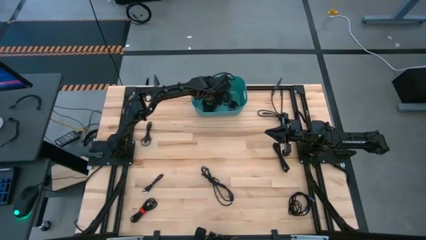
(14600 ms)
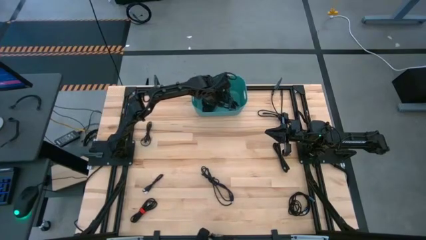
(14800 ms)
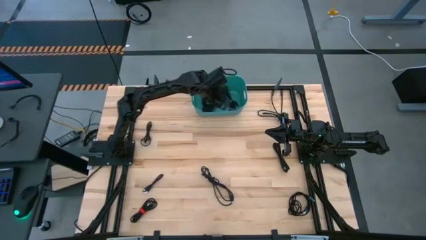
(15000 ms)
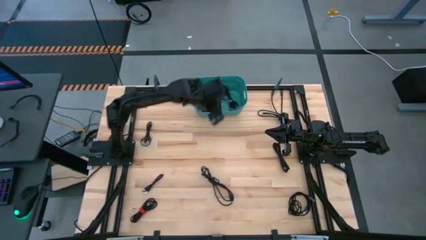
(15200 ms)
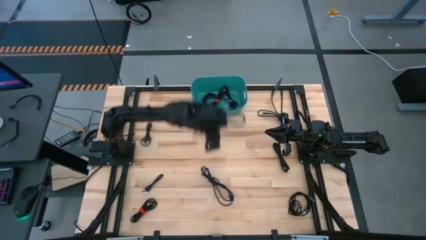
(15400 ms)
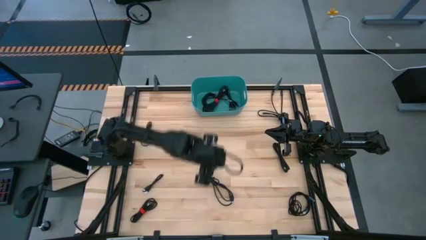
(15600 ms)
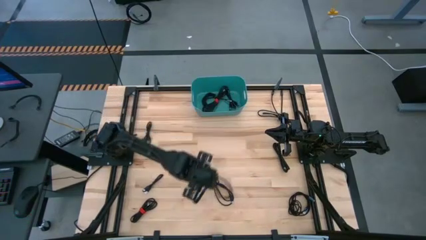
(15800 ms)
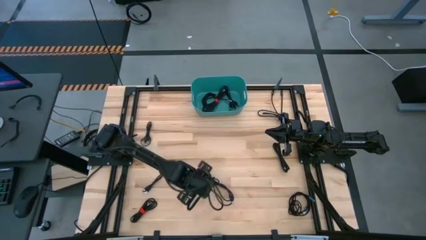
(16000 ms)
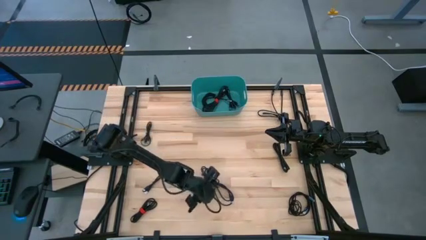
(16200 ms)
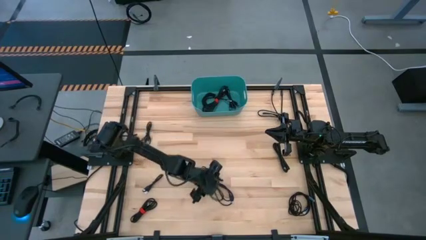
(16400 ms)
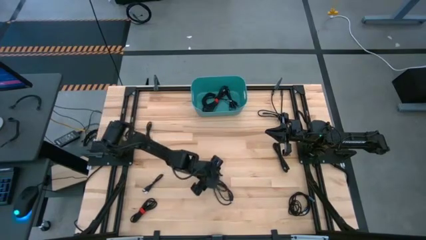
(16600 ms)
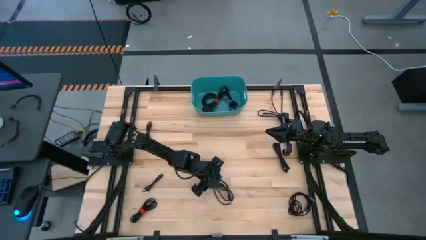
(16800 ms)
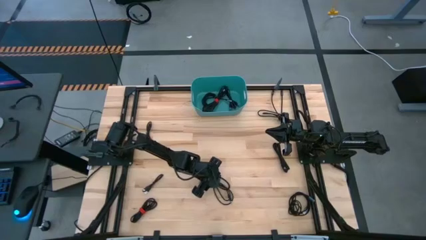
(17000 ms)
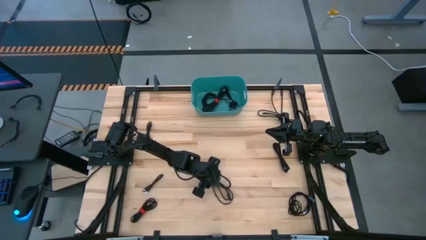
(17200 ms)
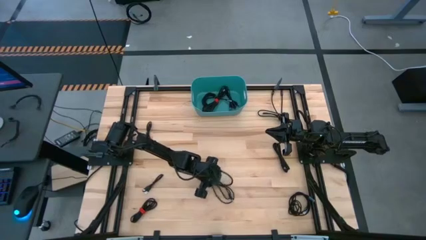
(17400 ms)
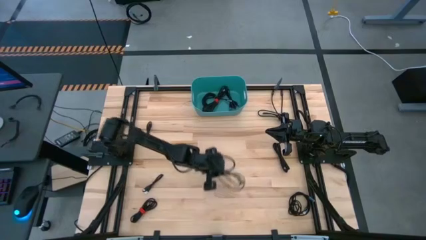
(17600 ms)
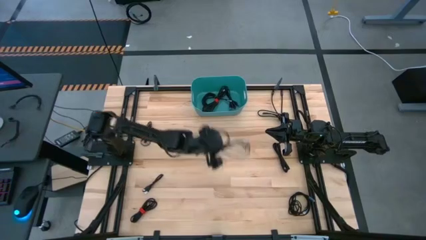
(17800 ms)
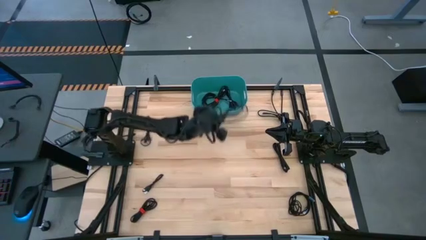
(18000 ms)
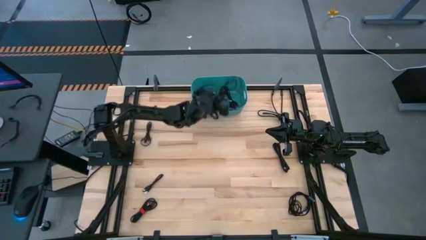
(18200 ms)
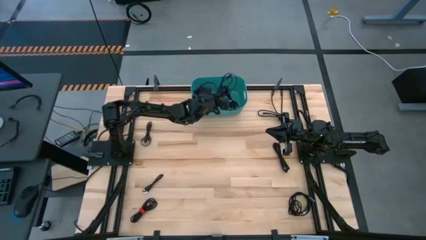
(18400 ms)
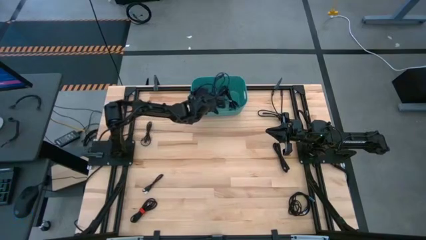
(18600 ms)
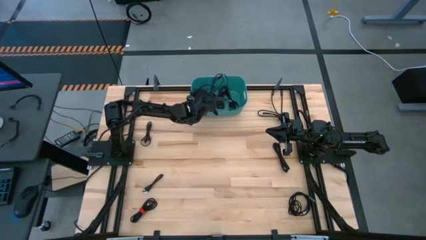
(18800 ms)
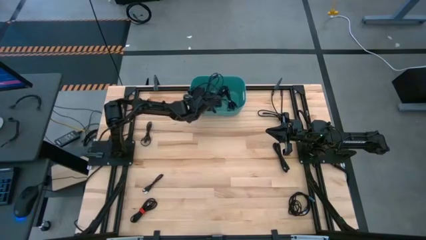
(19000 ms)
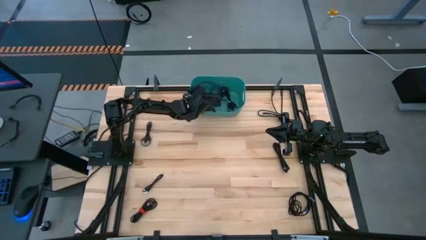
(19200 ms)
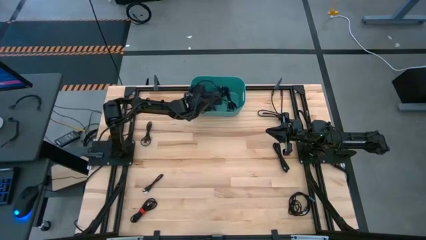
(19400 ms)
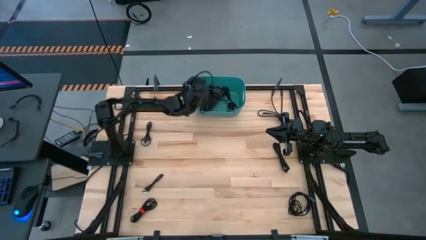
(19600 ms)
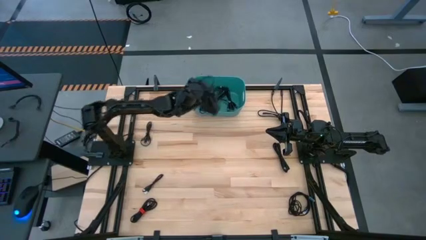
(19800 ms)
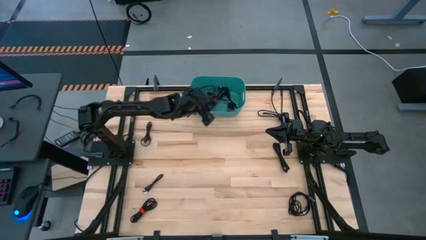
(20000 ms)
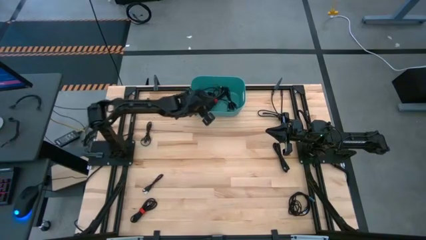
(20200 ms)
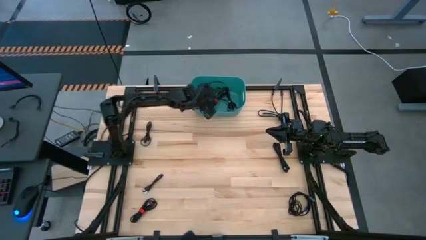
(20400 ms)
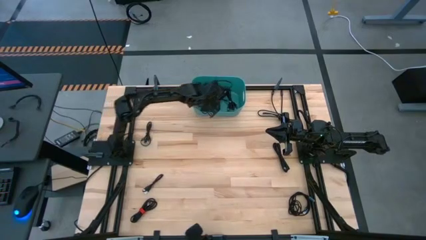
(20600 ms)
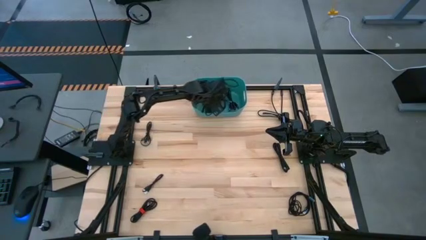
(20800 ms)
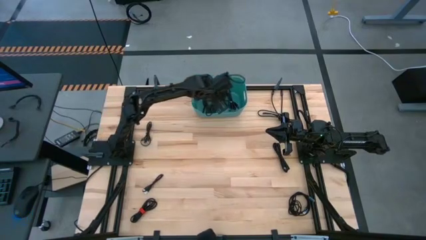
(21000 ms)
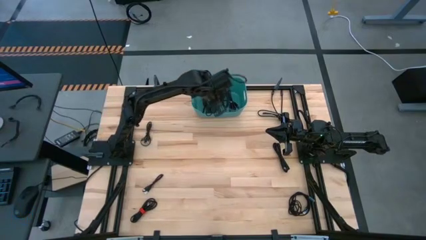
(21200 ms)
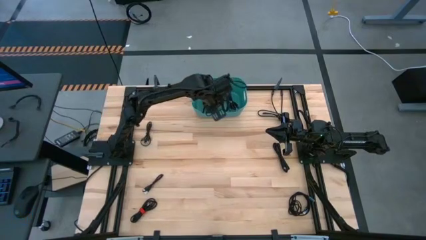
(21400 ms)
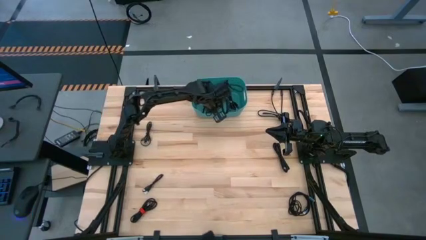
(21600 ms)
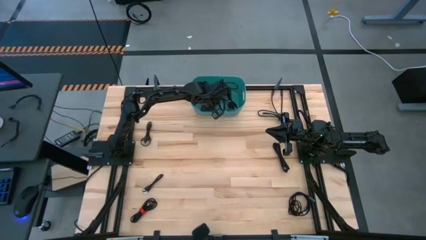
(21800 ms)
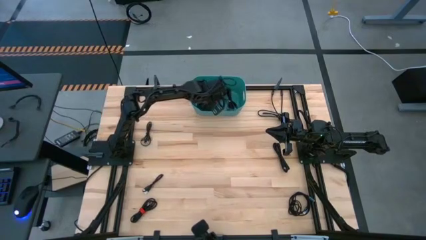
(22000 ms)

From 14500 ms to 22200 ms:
Task: Pick and place USB-C Cables
Put the black charger cable into the blue bin

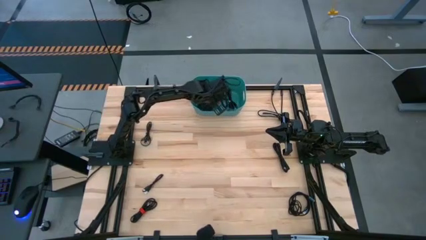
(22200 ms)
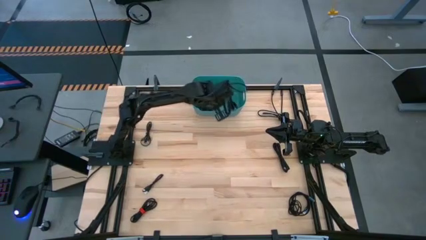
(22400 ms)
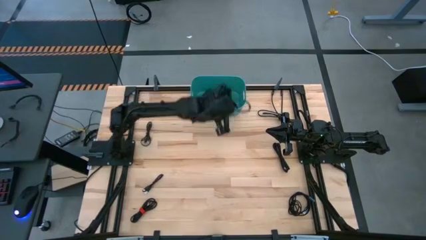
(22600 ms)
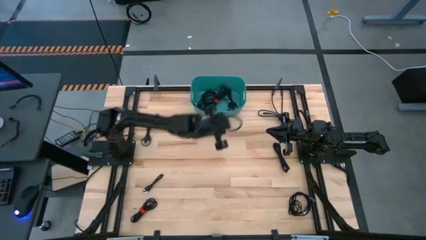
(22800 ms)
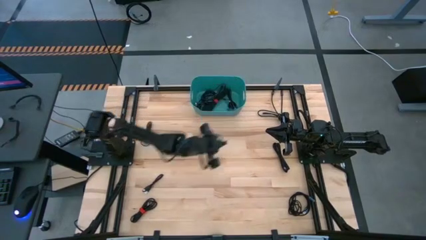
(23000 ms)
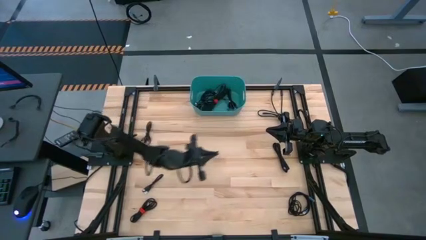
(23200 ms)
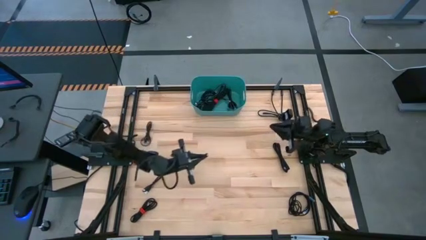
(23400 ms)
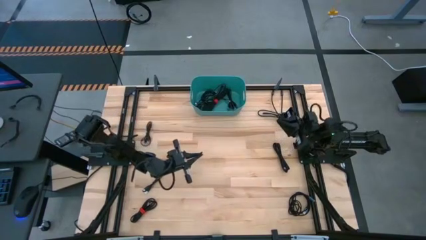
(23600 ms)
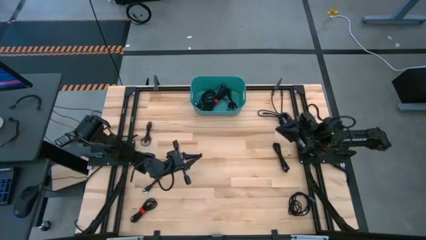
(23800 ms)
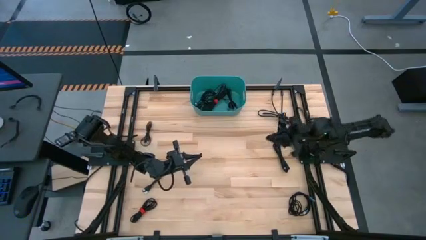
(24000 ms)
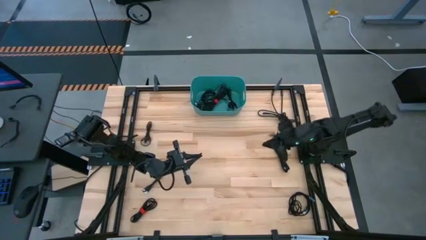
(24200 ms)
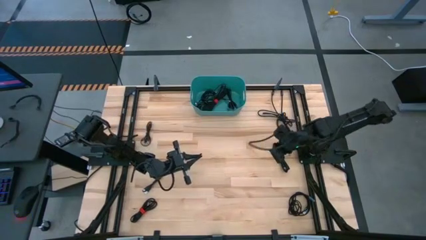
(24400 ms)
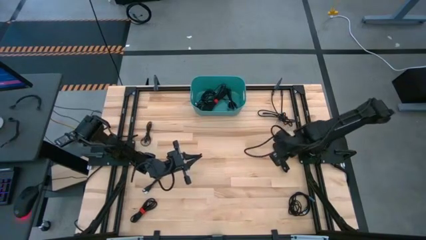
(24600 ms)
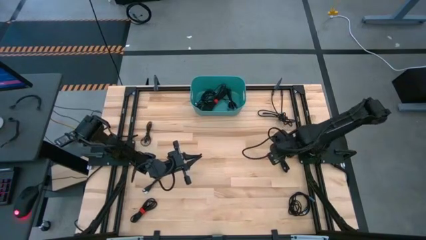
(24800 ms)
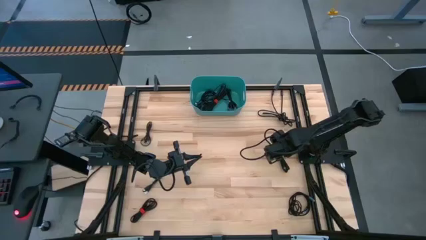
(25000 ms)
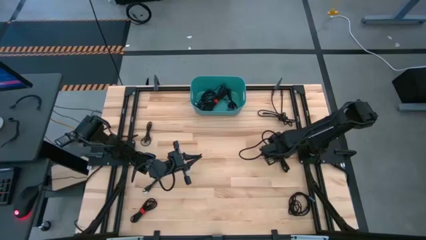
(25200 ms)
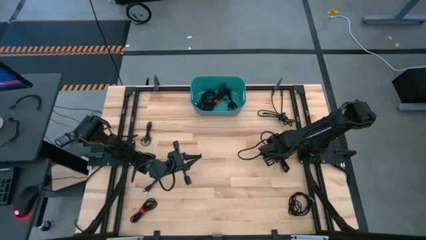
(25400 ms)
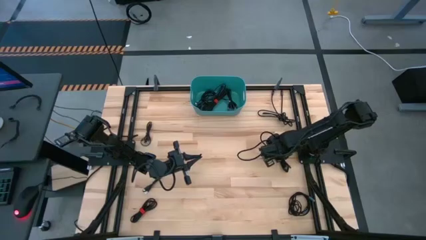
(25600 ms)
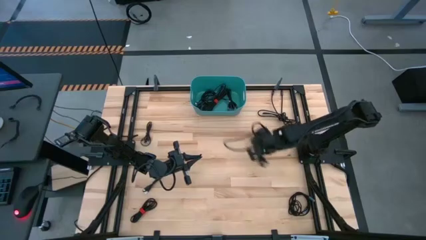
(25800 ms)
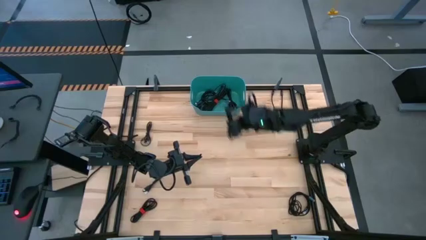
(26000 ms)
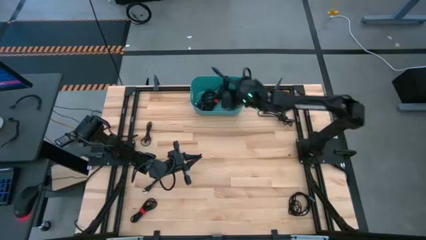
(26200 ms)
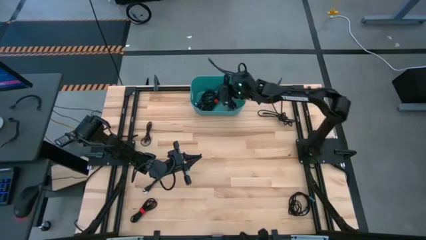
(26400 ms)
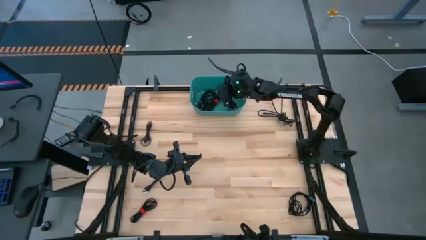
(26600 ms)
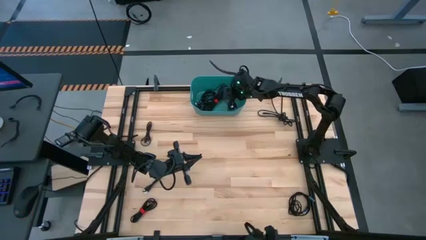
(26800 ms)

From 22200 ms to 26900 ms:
Put the black charger cable into the blue bin

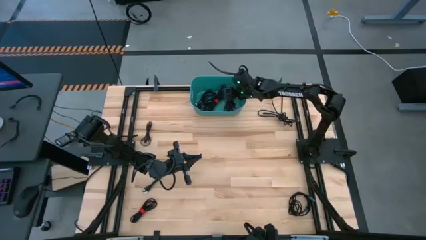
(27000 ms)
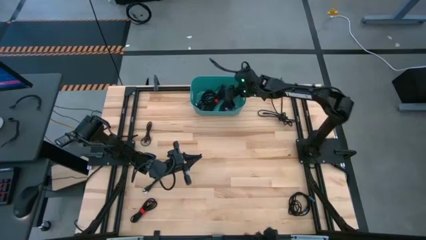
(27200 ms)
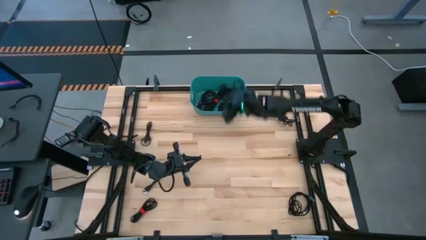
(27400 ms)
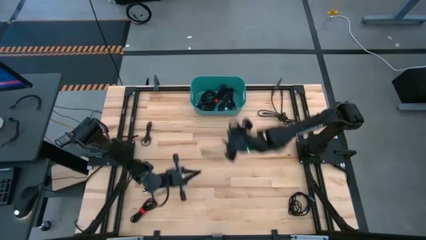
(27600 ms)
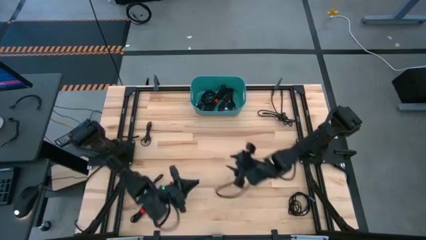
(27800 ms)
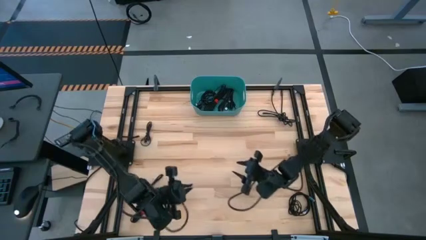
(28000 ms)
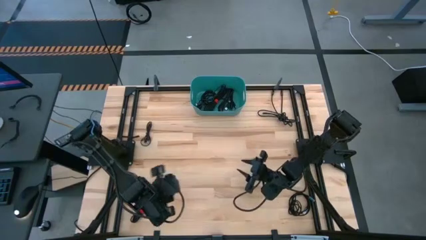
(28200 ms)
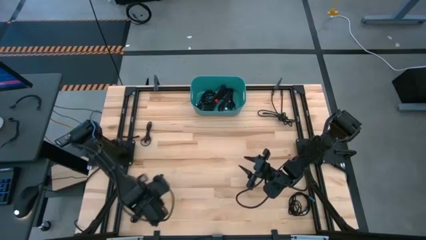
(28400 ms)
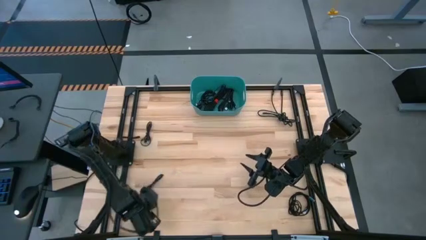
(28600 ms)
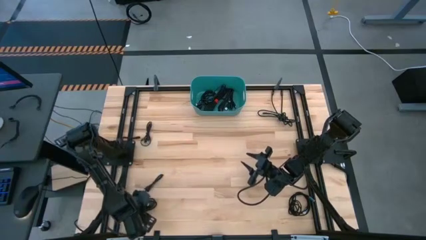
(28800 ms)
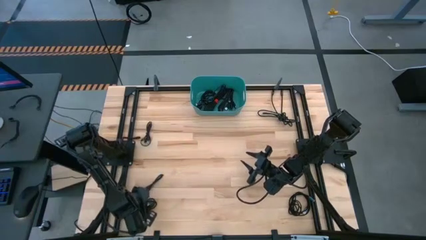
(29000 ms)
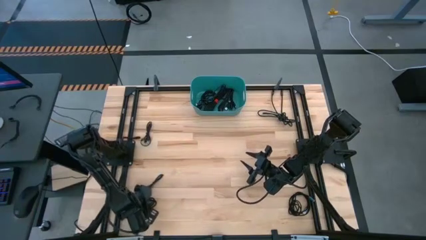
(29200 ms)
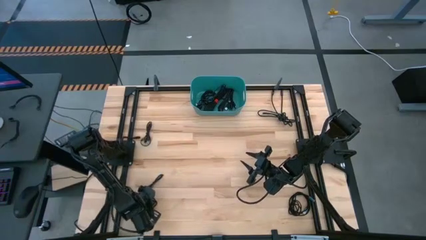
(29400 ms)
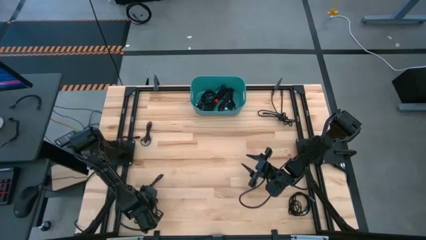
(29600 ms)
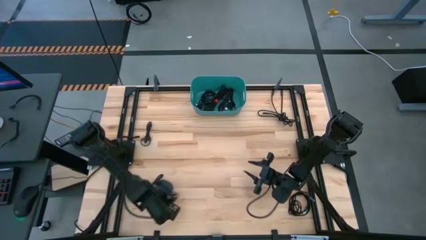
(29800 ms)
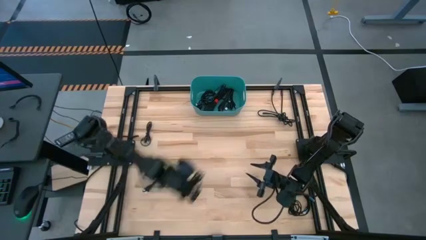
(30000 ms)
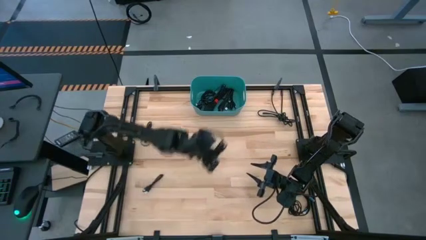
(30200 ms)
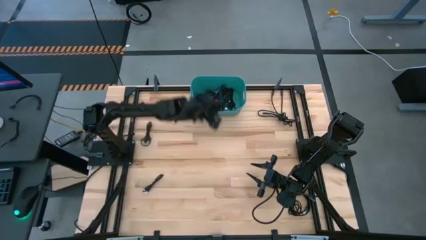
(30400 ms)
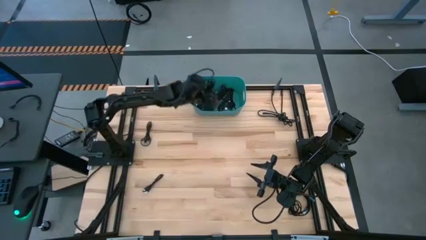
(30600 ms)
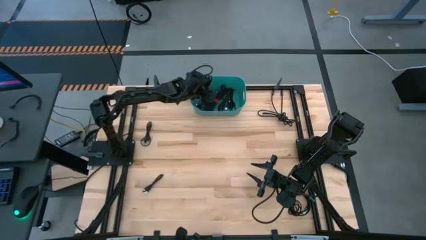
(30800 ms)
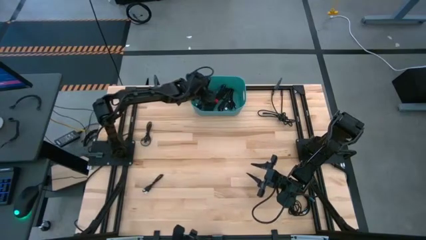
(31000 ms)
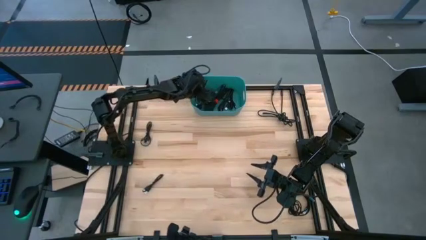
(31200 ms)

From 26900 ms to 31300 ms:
Put the black charger cable into the blue bin

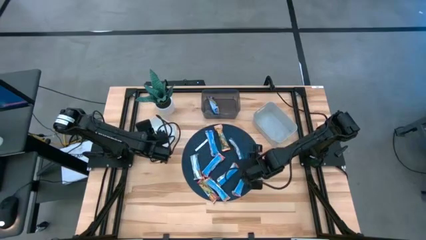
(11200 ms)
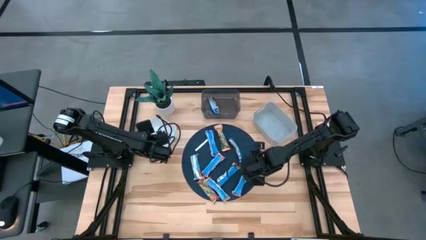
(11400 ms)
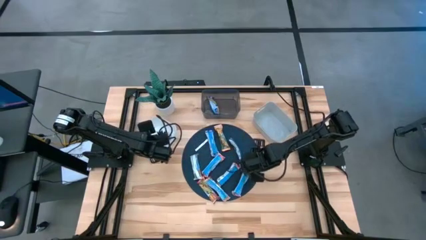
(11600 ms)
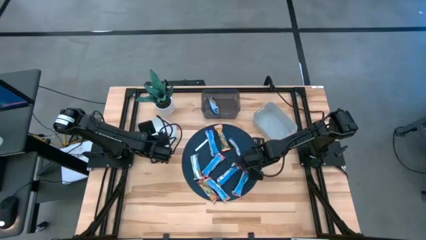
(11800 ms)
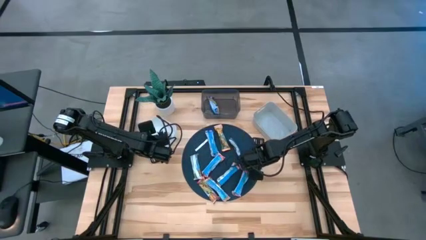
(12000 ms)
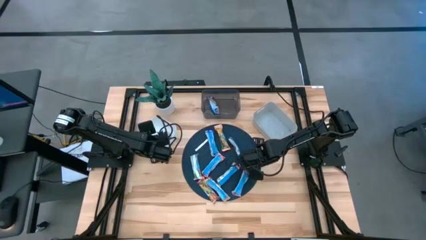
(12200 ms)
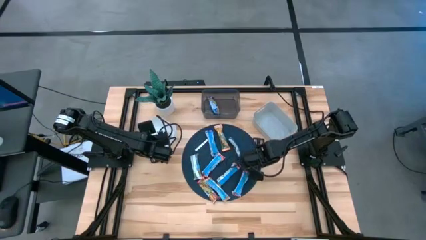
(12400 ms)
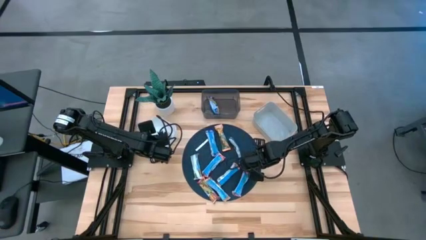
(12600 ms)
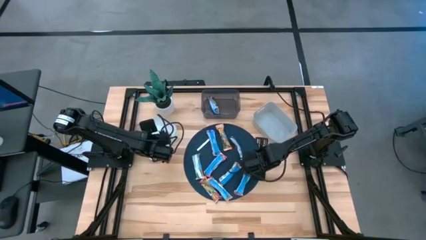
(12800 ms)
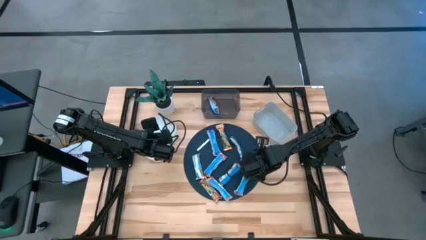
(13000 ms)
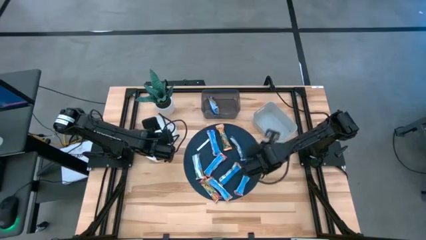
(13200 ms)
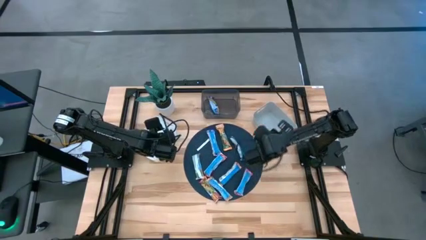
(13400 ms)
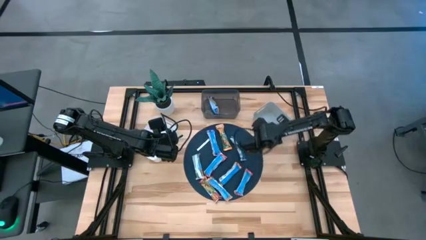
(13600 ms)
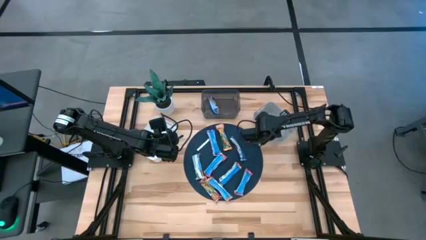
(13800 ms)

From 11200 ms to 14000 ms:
Task: Pick and place Granola Bars by type
Put the red granola bar into the gray bin
